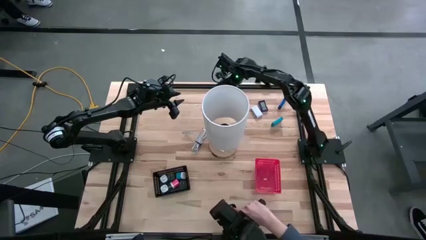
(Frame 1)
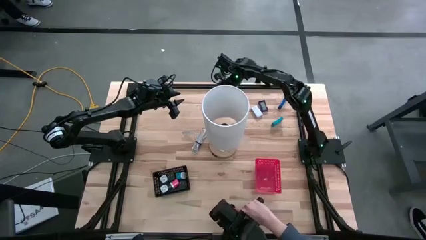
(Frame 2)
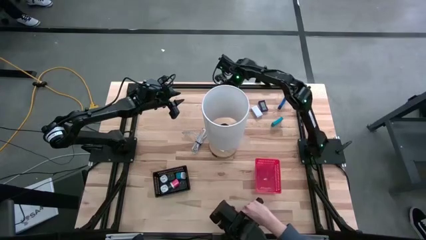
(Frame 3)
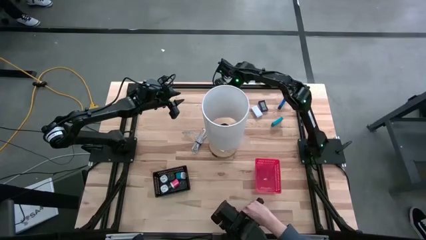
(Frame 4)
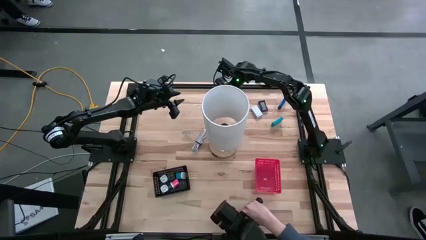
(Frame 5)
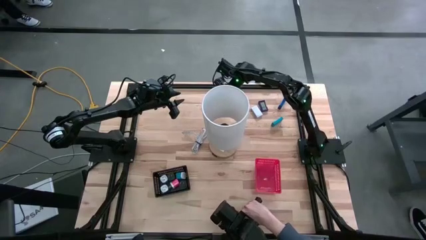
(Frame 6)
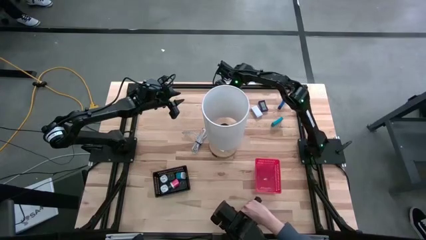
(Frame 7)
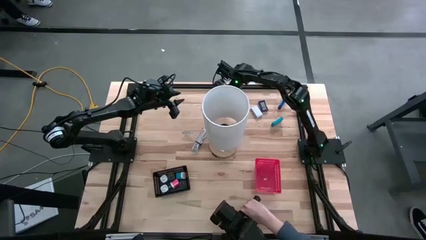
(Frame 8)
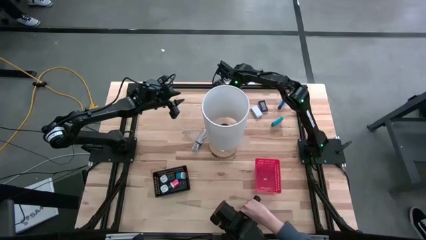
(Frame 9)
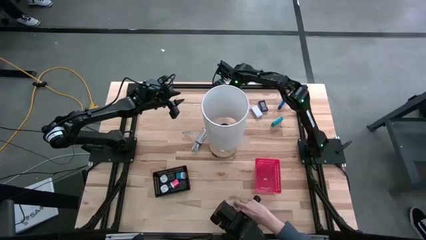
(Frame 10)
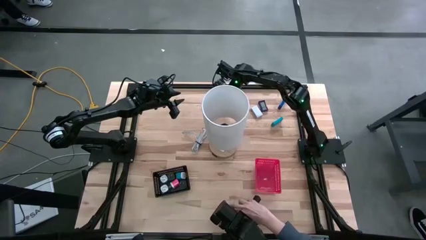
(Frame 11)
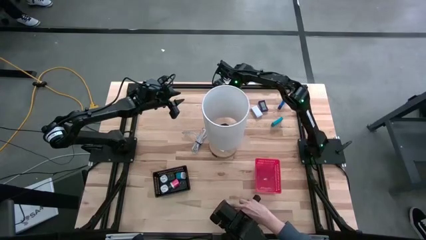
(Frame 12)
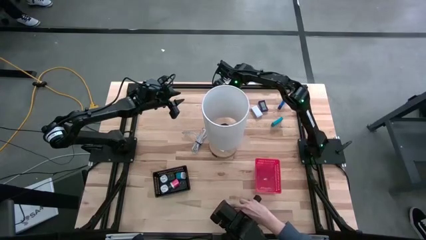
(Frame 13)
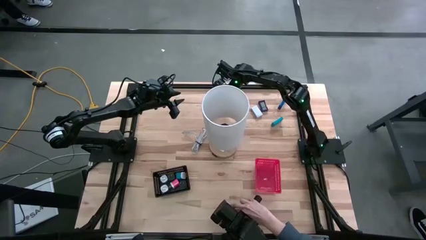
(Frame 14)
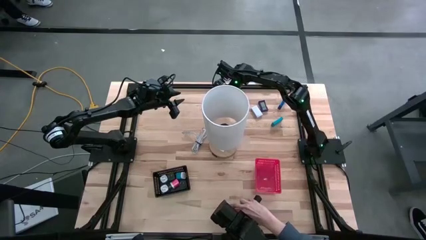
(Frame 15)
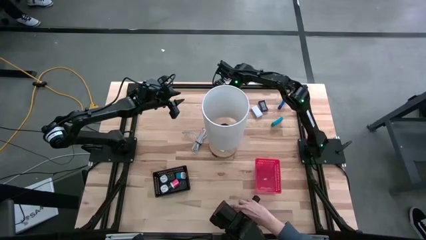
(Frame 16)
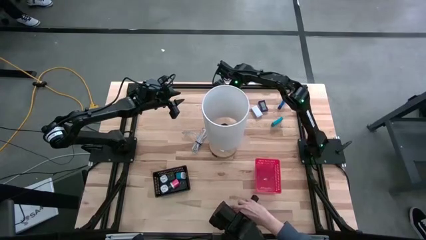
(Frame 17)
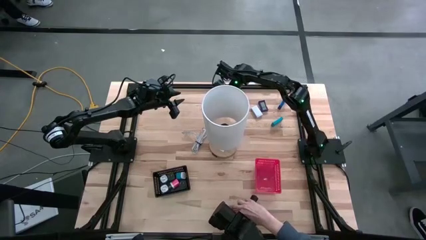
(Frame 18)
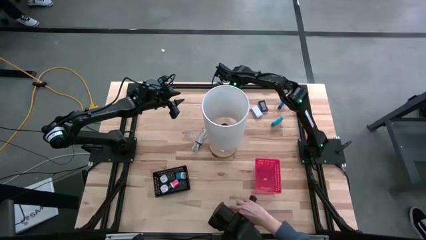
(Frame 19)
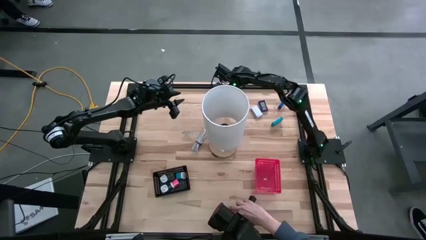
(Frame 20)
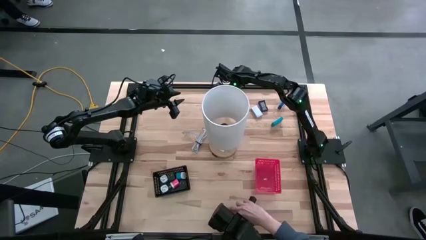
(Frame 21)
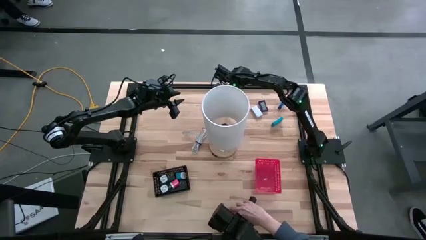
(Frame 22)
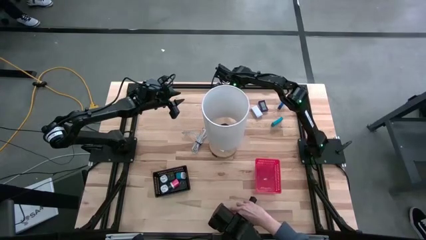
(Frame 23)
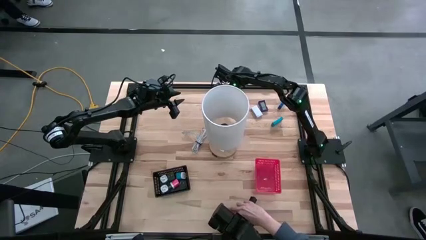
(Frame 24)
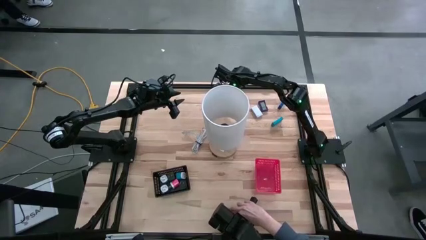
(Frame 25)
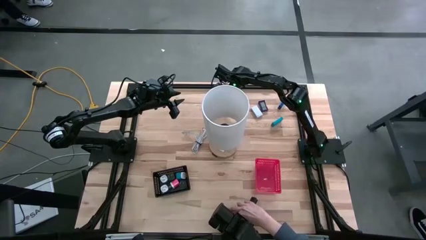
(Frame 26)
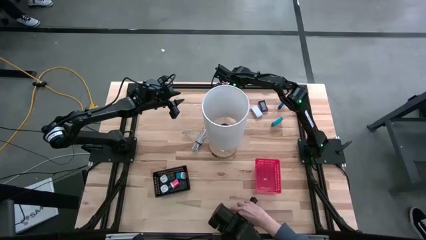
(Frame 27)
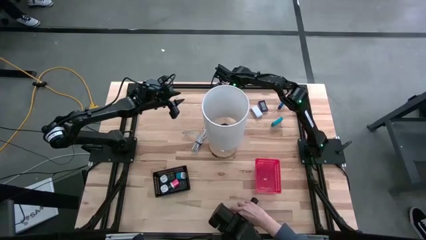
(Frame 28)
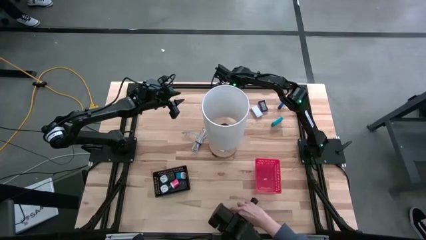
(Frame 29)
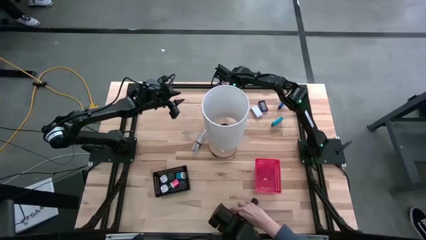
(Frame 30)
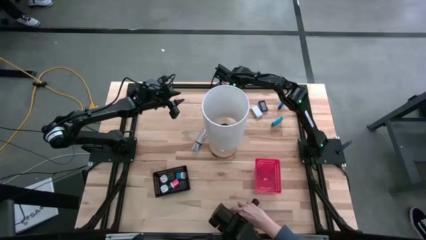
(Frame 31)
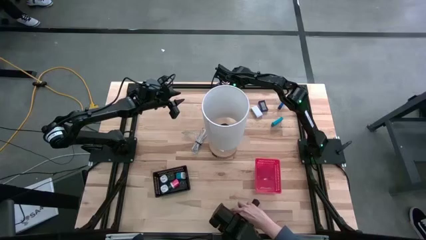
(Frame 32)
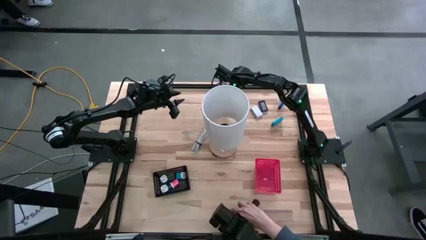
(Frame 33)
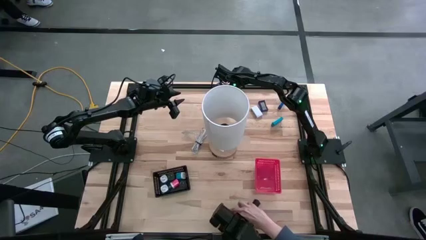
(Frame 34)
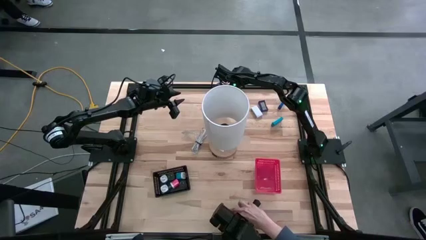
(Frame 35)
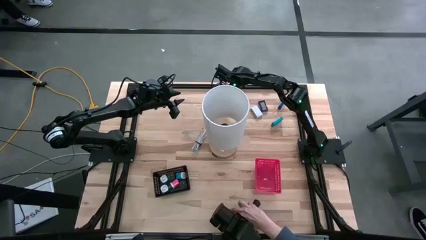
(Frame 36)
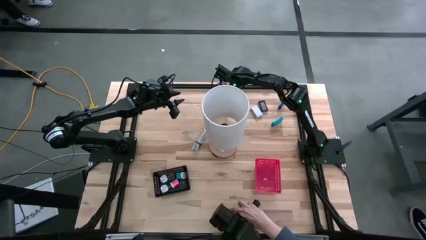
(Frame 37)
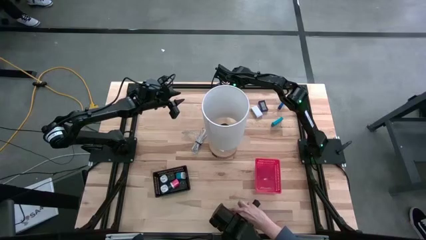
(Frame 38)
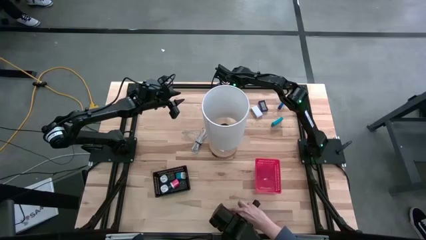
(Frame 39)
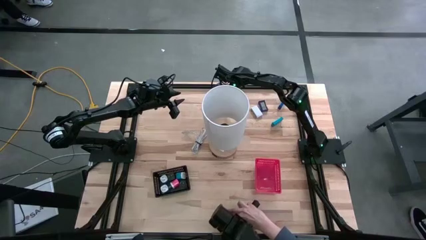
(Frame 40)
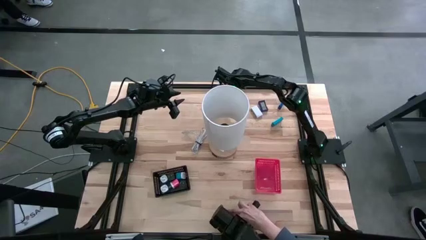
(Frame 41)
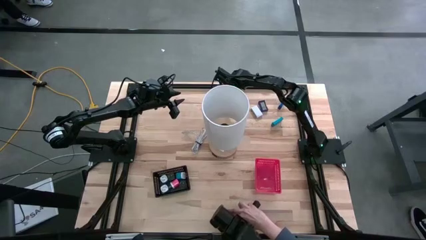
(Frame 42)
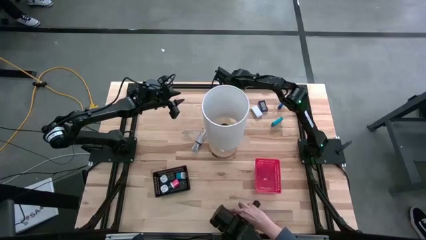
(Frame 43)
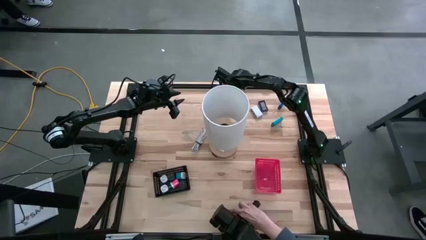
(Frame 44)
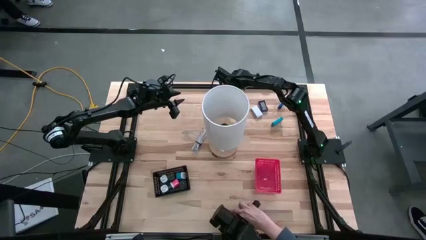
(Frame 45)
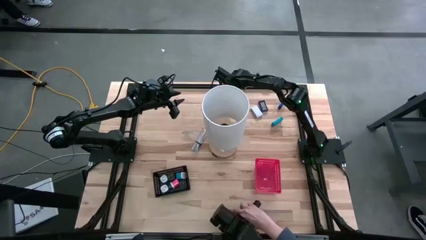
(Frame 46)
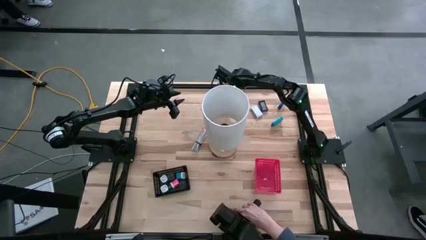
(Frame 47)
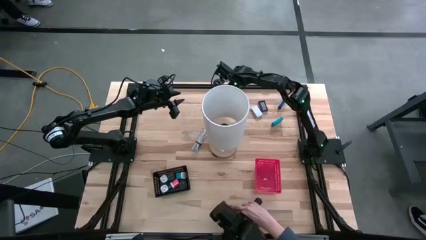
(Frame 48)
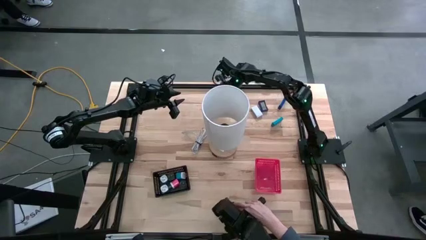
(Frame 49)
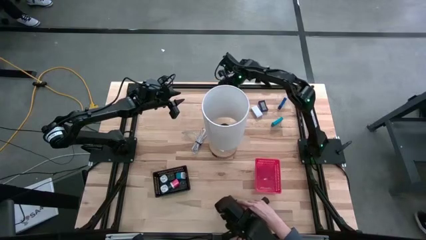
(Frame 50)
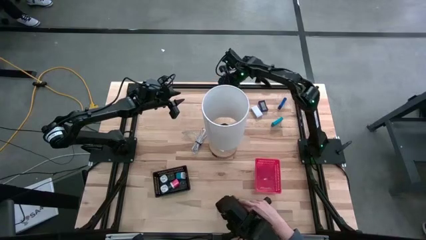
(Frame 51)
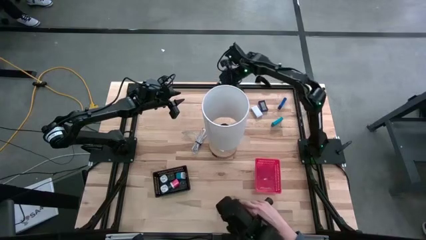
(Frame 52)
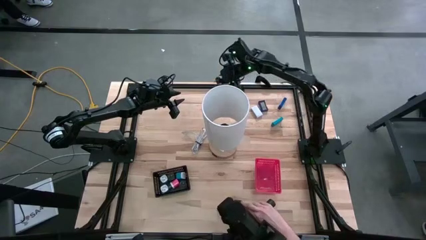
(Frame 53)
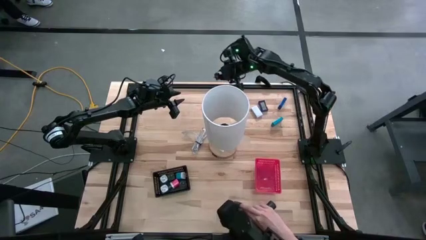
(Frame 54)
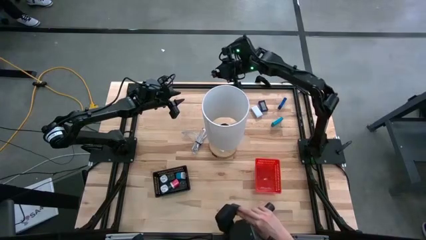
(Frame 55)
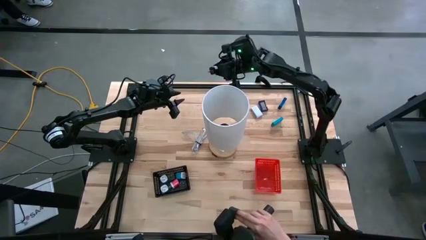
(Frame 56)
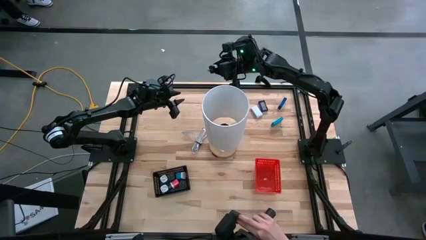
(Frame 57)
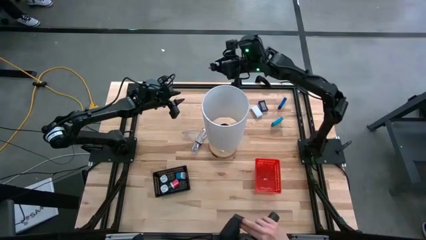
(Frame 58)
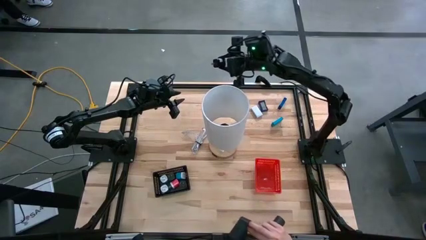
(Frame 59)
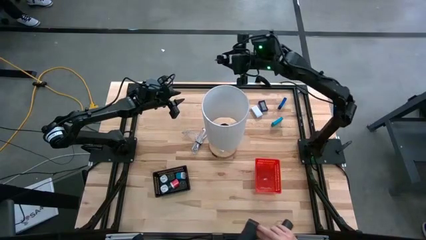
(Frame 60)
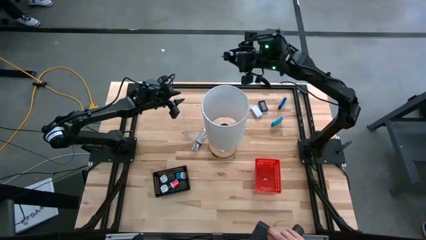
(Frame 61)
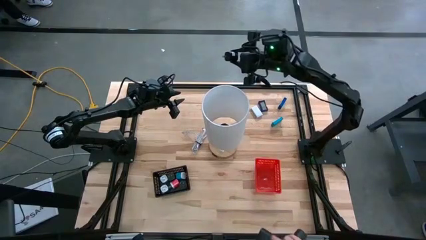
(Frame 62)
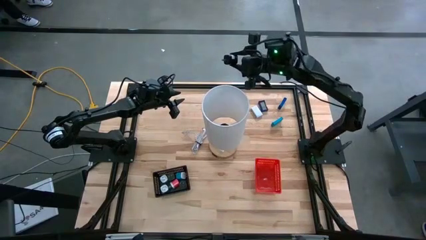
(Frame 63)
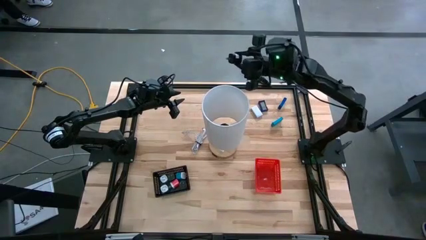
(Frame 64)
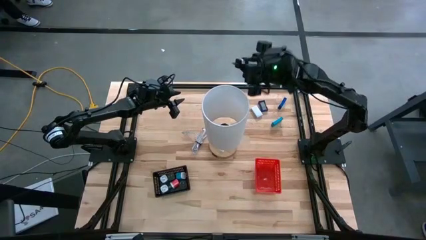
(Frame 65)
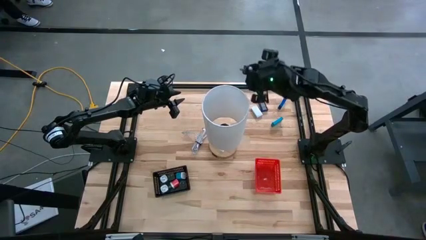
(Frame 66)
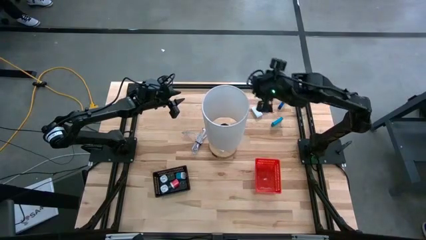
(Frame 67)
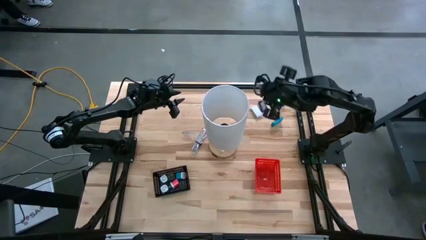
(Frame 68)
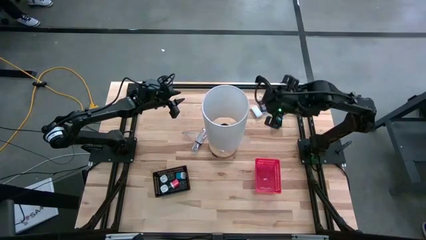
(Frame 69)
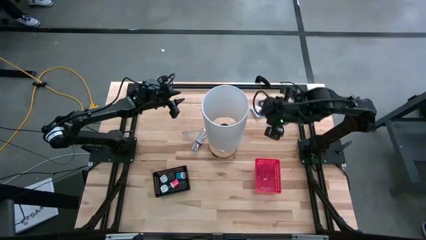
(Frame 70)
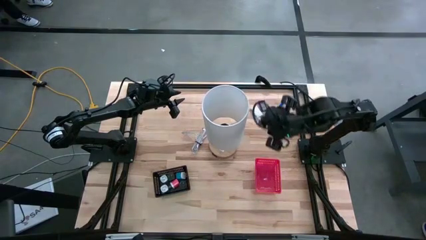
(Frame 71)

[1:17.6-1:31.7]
Task: Pick & Place Office items
Put the black charger adapter into the black bin
